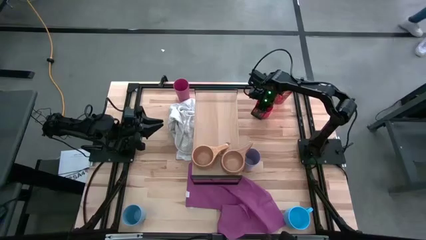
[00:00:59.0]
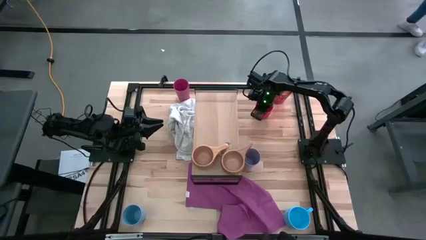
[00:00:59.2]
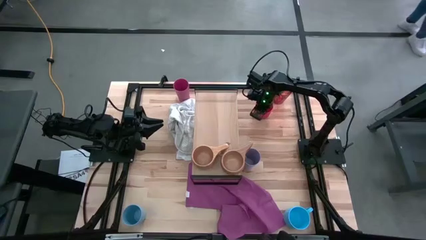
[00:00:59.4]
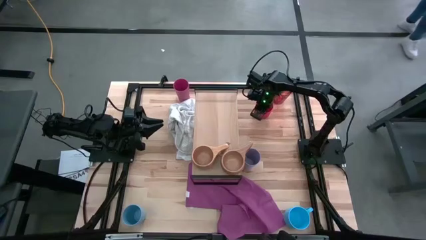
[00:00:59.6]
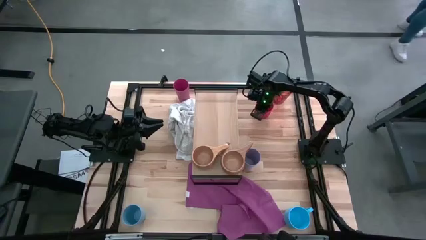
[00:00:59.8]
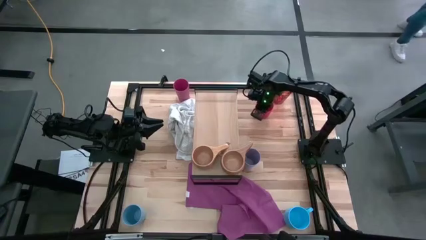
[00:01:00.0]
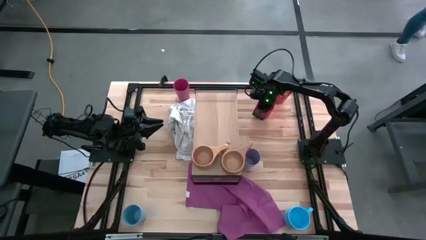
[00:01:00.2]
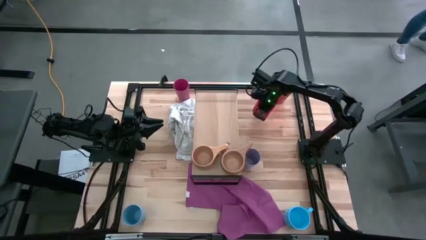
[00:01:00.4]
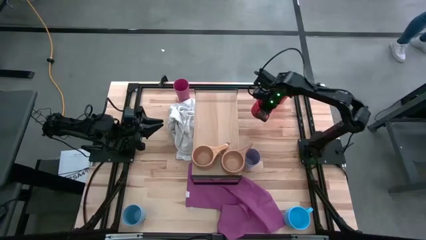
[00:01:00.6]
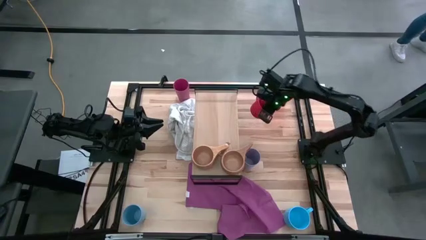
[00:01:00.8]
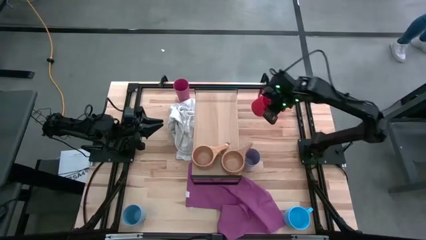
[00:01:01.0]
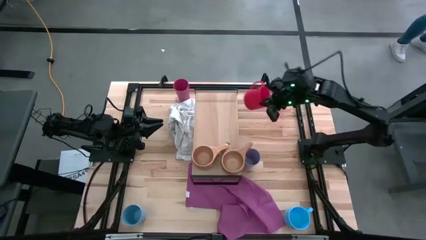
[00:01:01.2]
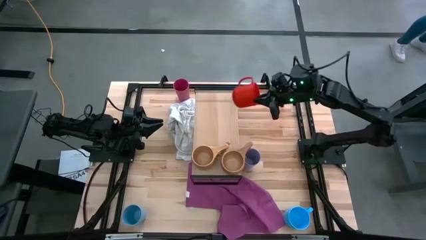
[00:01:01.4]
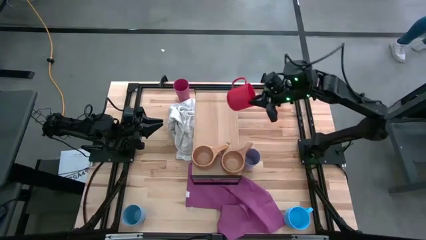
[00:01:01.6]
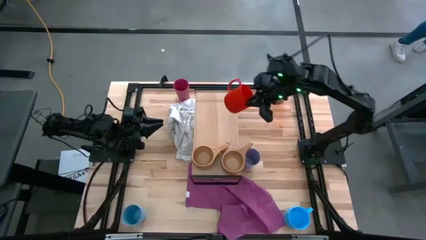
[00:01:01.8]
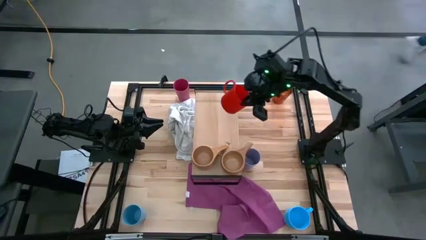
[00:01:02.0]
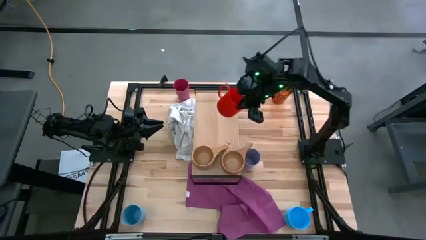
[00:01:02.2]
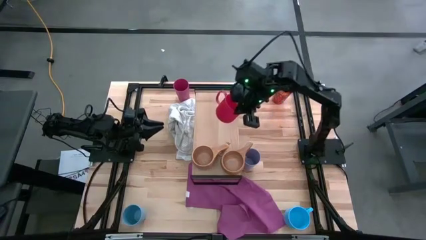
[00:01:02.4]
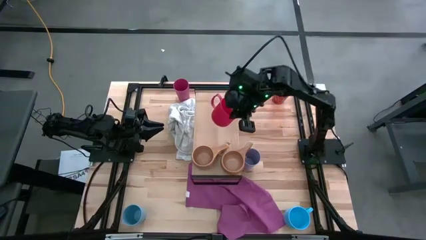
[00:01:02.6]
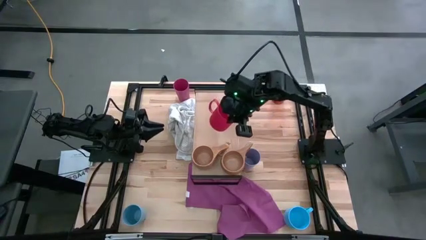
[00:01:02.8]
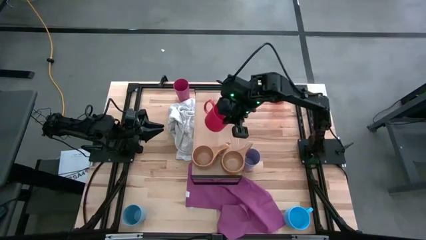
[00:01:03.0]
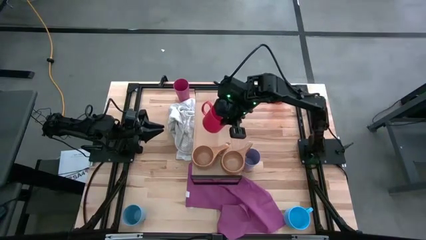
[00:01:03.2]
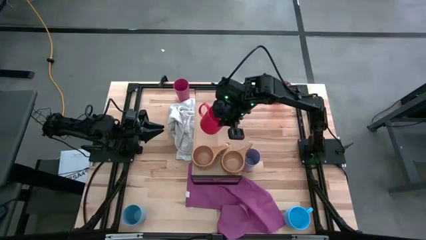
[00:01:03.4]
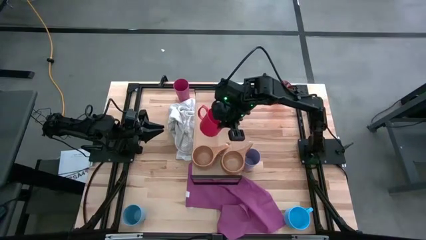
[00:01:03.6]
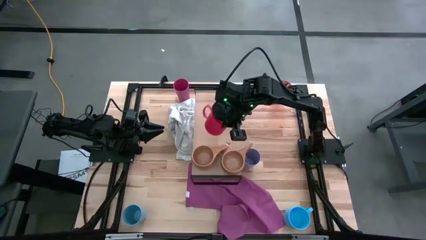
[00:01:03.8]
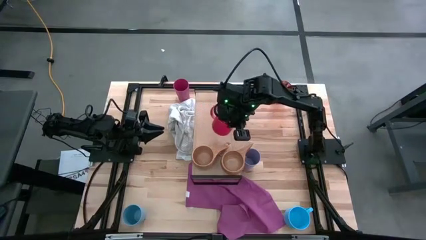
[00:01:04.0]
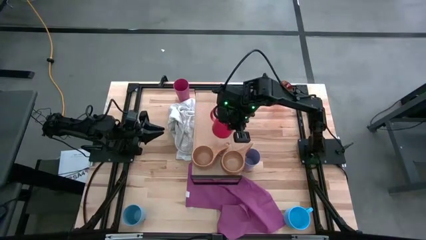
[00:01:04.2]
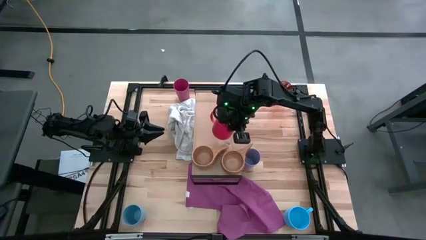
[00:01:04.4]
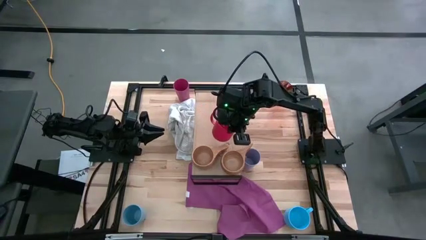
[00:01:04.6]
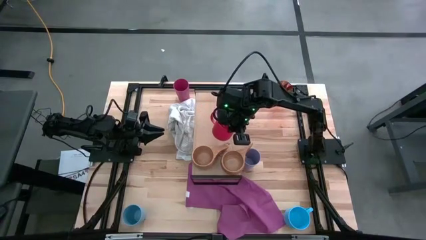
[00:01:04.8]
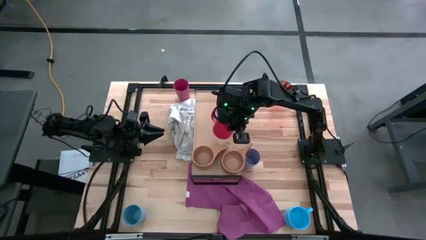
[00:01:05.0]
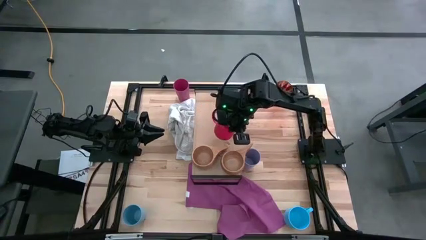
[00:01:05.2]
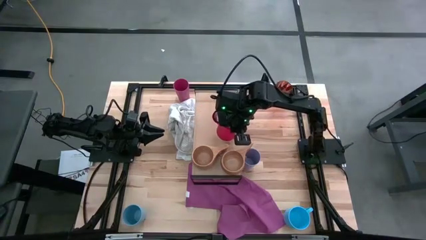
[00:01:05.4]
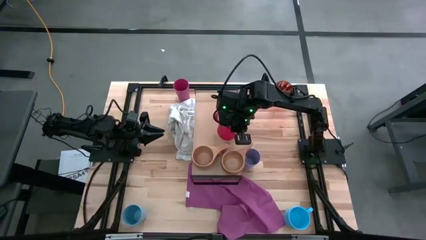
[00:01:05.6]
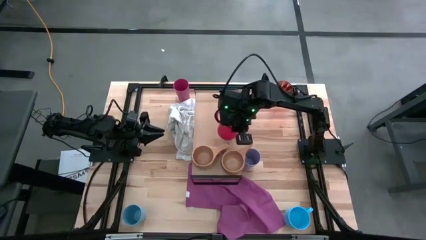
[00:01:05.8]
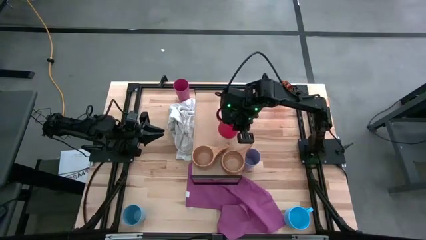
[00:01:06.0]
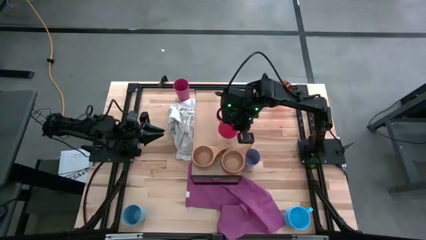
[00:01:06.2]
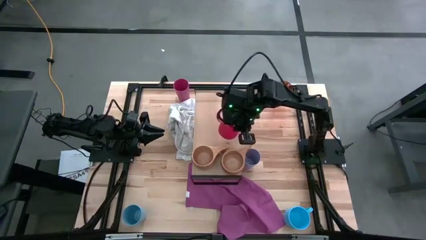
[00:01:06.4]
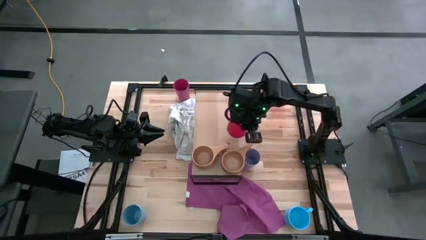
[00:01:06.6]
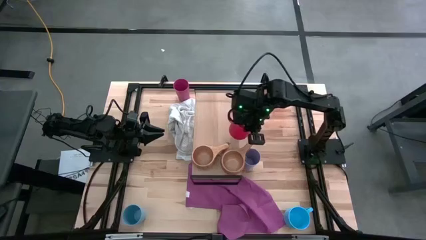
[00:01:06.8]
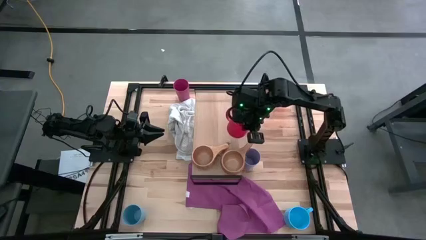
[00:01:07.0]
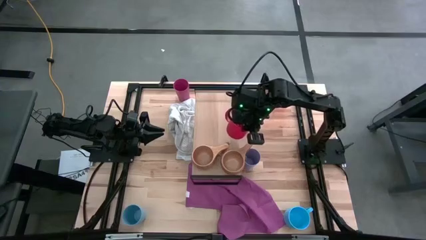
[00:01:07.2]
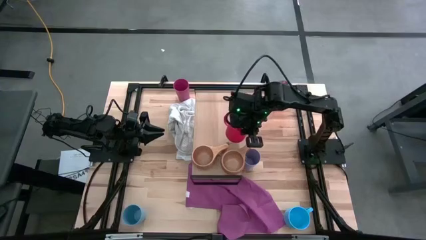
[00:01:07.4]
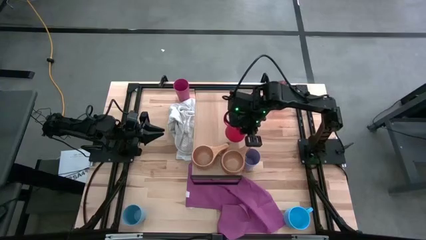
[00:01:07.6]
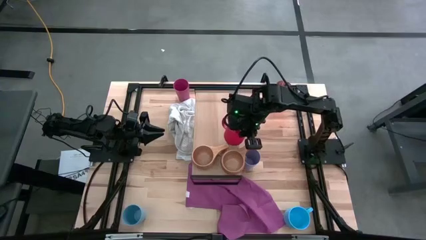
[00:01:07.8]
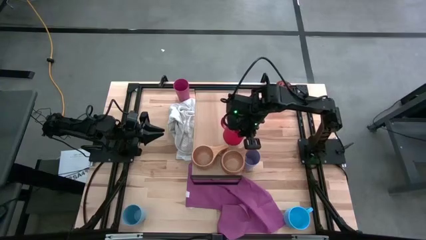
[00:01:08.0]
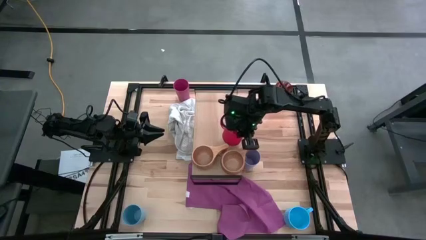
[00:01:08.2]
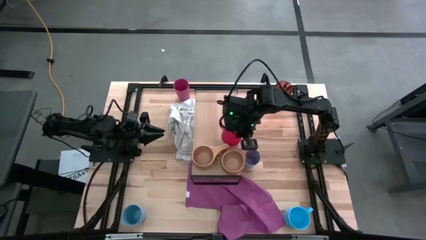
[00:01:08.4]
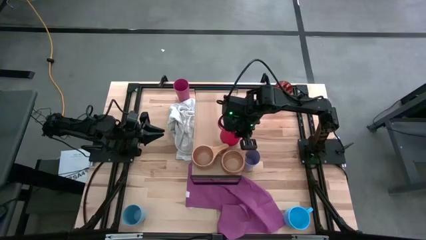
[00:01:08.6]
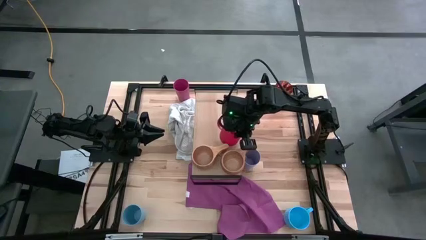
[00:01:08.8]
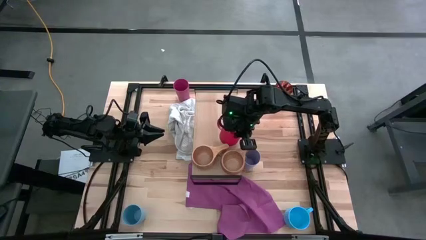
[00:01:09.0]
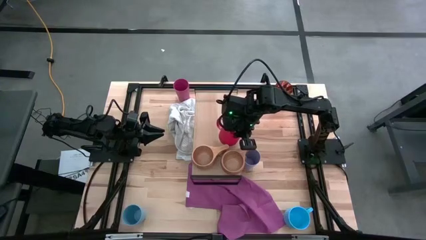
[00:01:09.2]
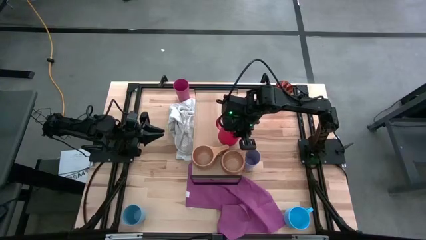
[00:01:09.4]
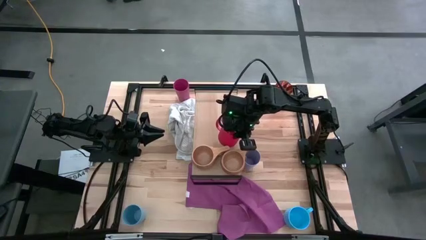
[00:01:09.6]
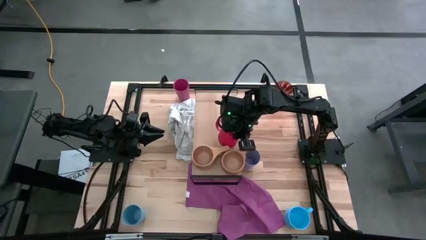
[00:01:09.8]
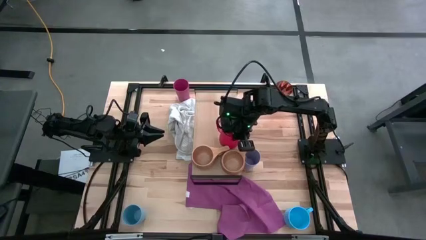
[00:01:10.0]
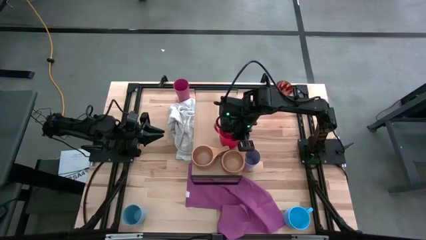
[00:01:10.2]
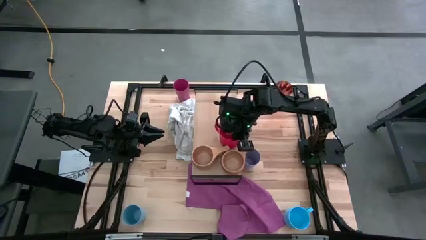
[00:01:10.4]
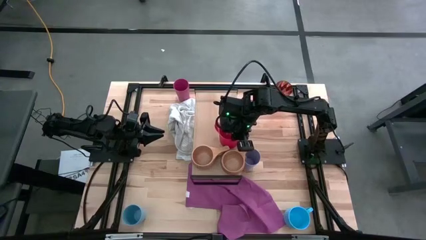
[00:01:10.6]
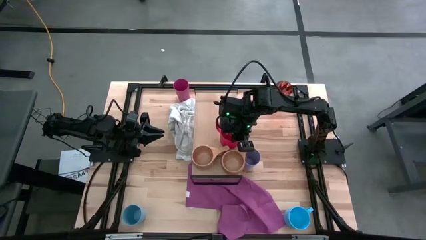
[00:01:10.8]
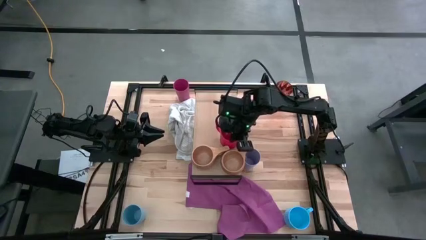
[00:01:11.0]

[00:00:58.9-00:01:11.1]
Task: Stack small to large cups/mugs on shelf
Put the red mug on the shelf
